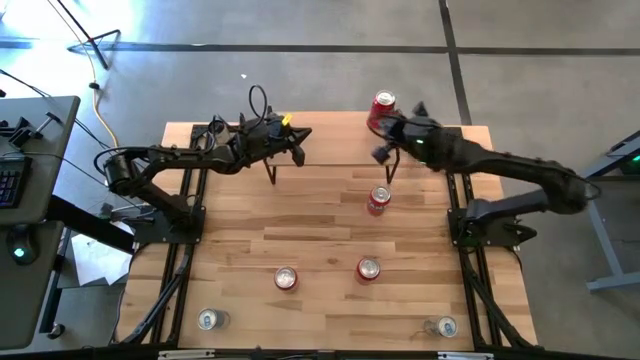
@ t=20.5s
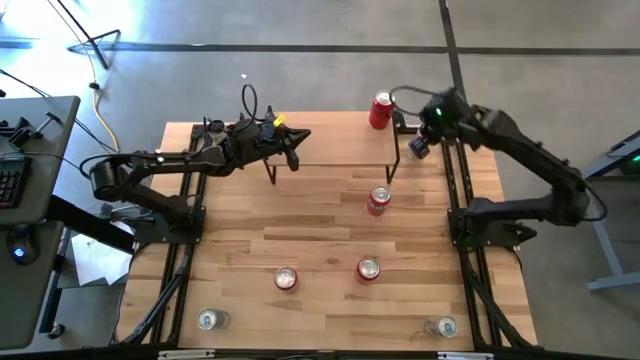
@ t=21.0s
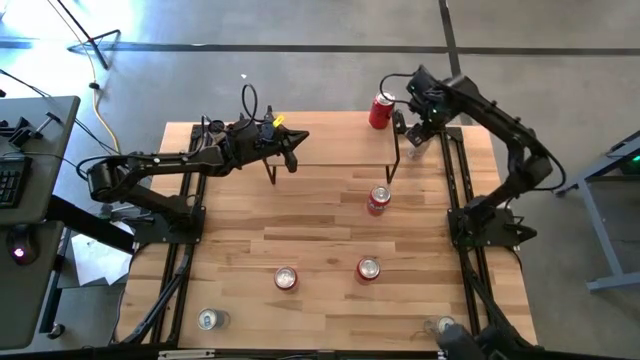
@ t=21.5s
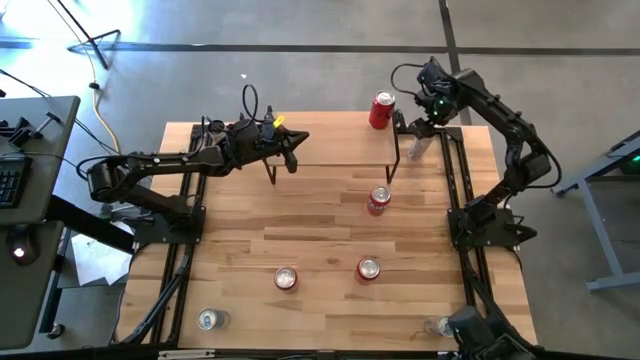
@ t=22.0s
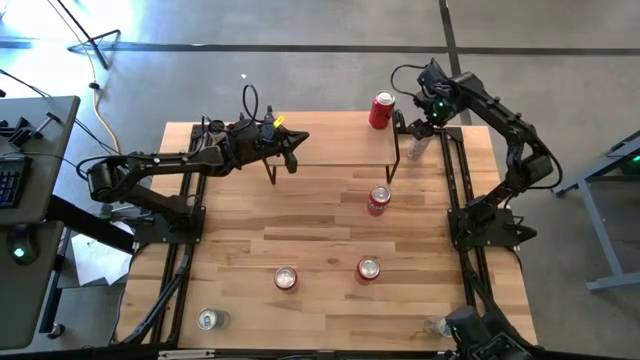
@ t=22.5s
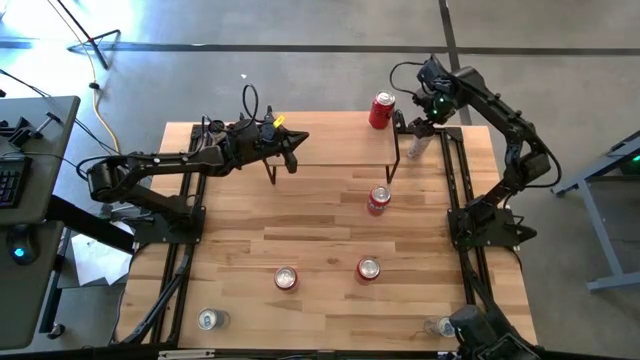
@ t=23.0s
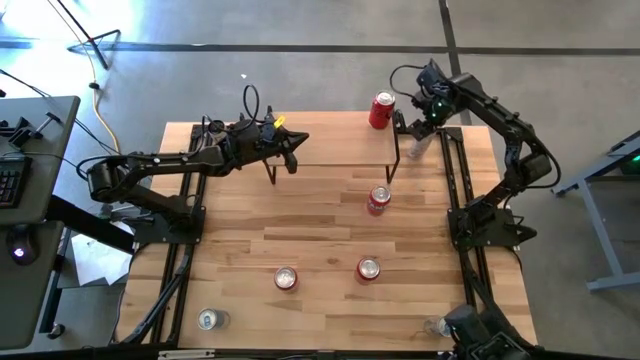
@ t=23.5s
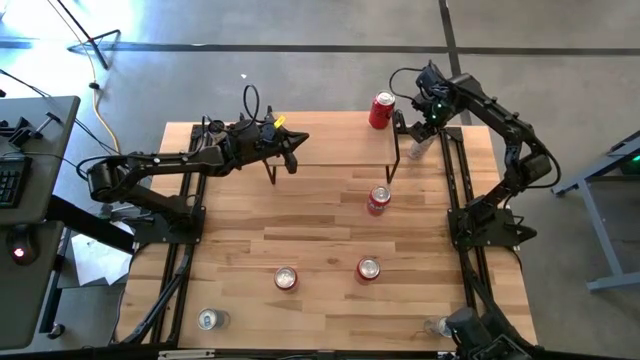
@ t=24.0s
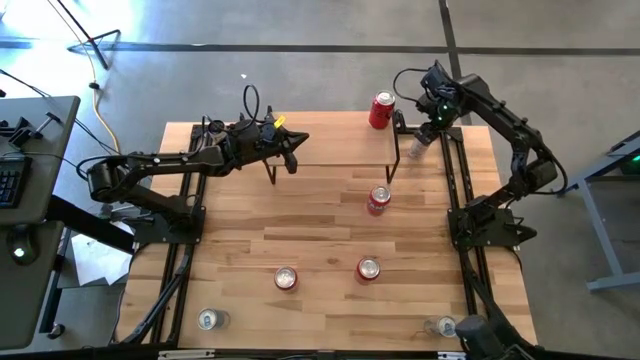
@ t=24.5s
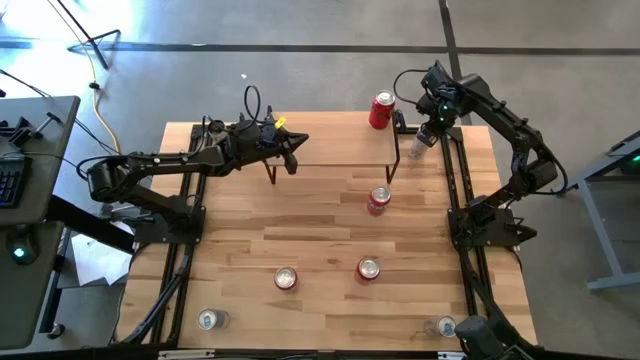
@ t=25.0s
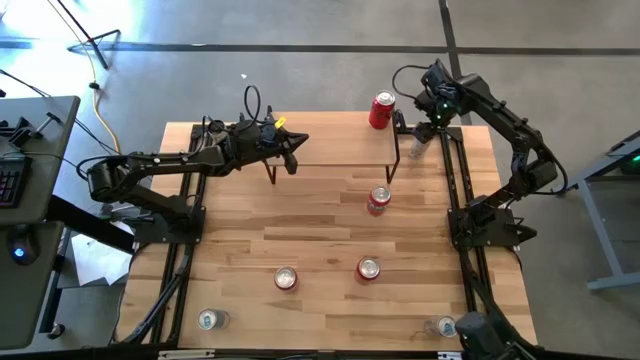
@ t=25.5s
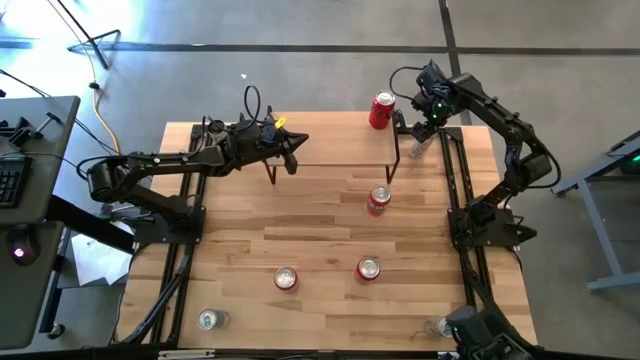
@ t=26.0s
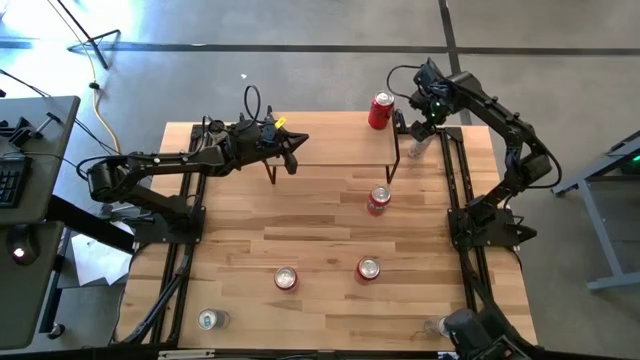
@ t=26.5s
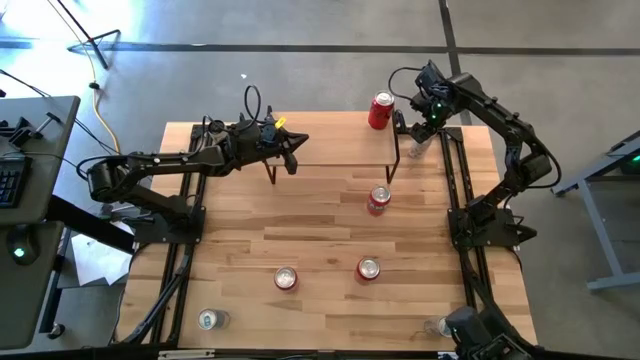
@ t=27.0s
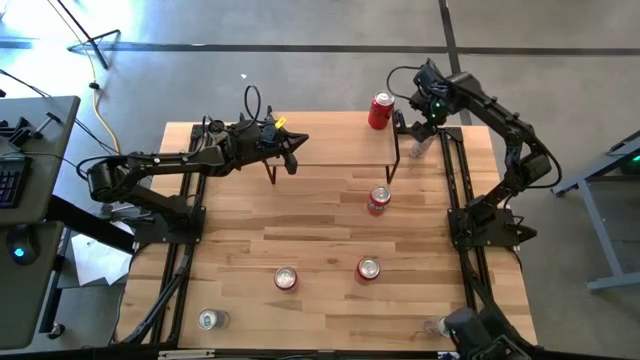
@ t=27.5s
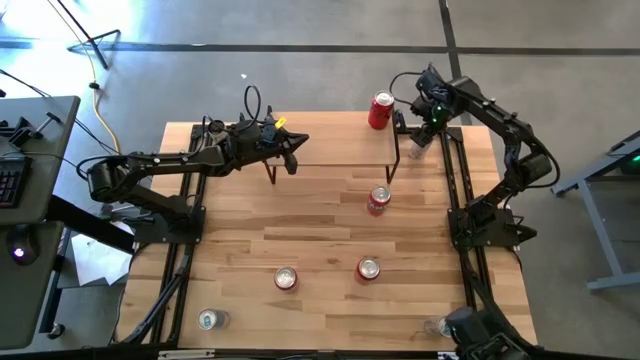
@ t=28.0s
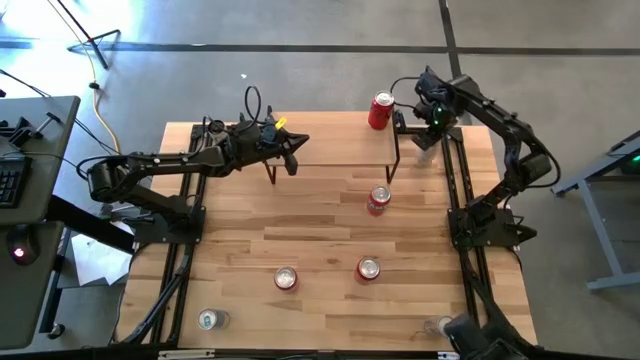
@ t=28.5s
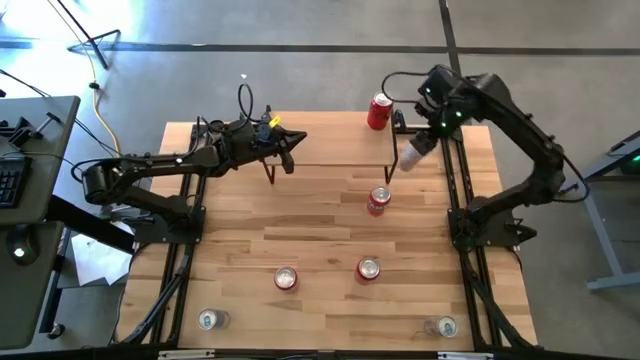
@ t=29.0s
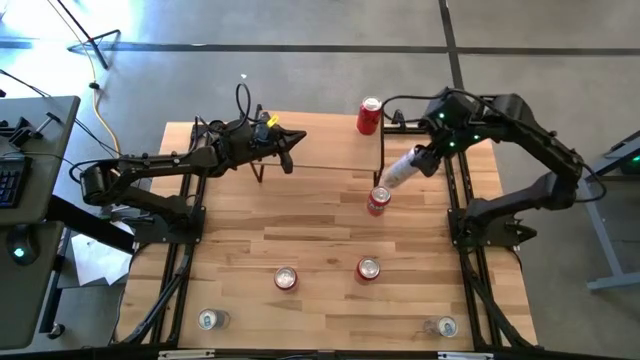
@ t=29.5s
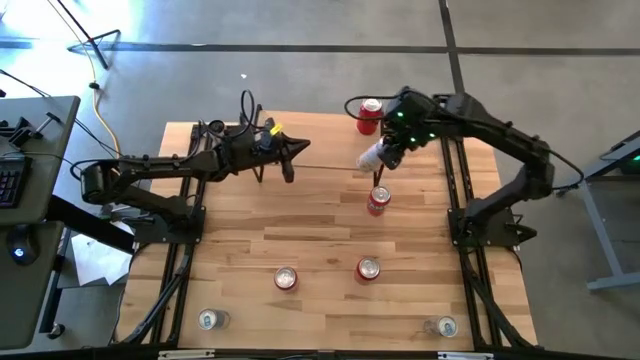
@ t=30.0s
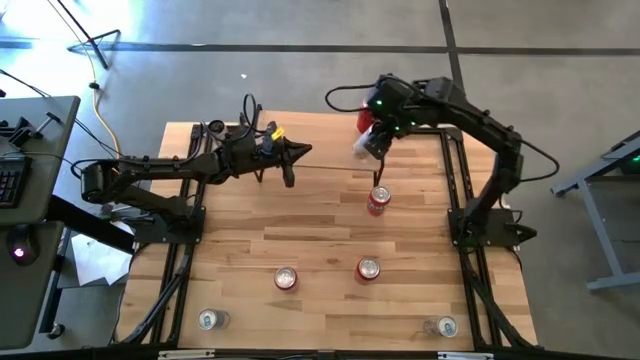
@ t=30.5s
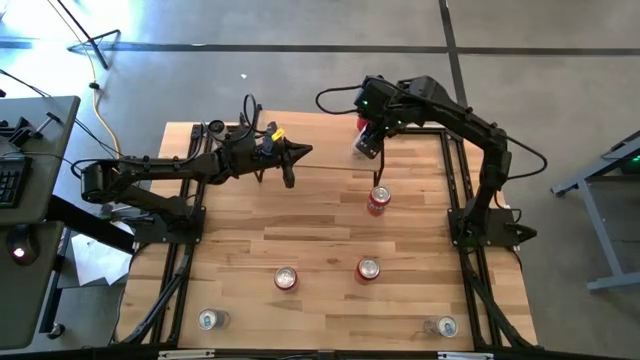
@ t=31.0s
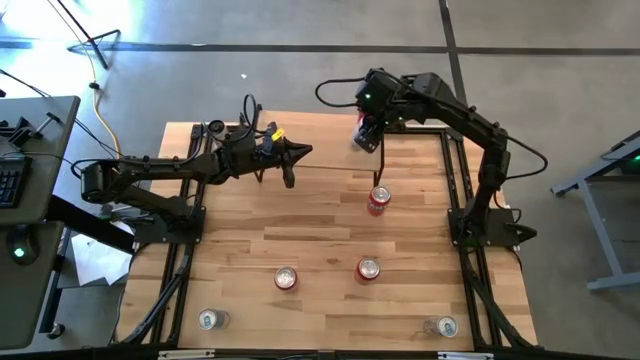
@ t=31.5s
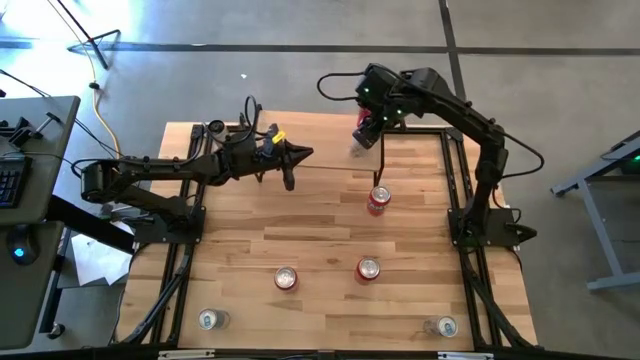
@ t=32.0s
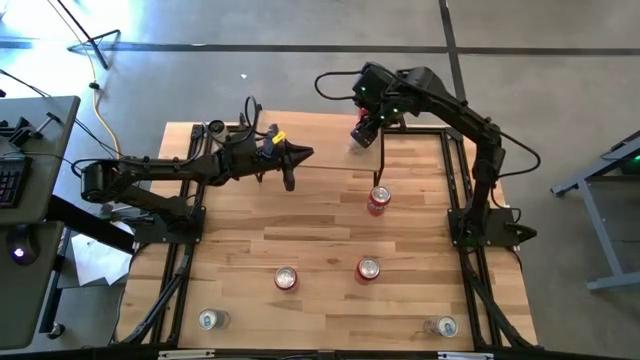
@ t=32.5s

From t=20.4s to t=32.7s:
Task: Place canned beverage on shelf
Put the right white and yellow soda can on the shelf

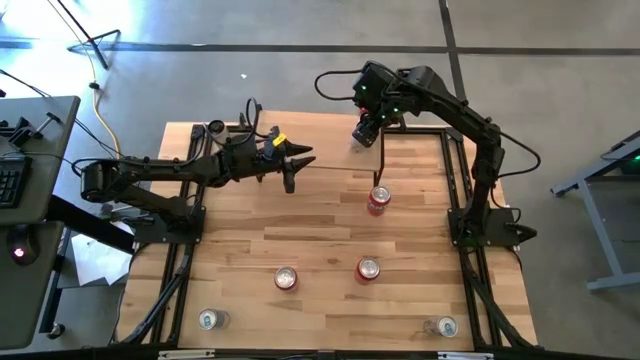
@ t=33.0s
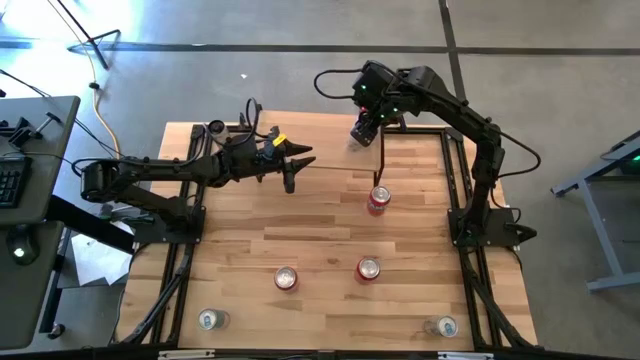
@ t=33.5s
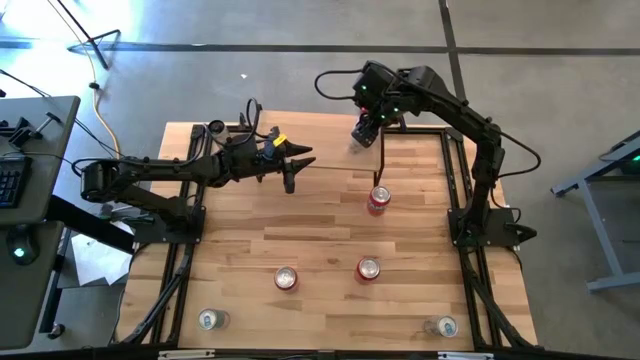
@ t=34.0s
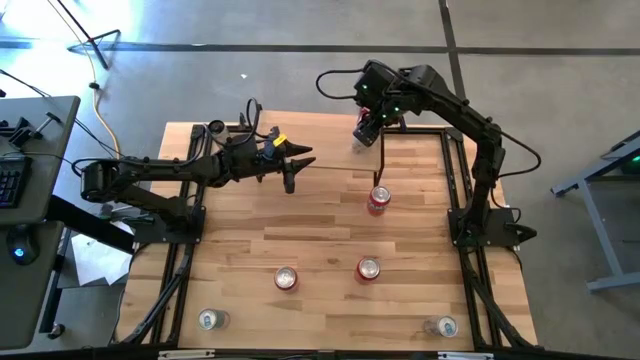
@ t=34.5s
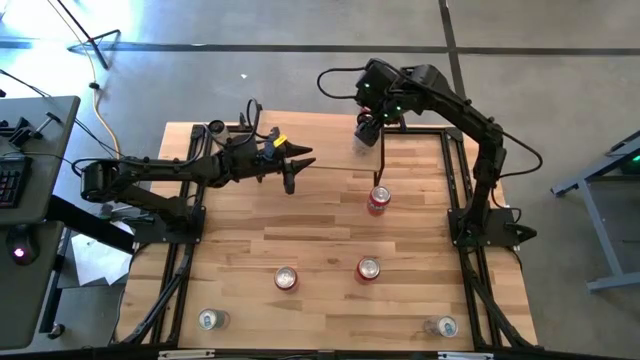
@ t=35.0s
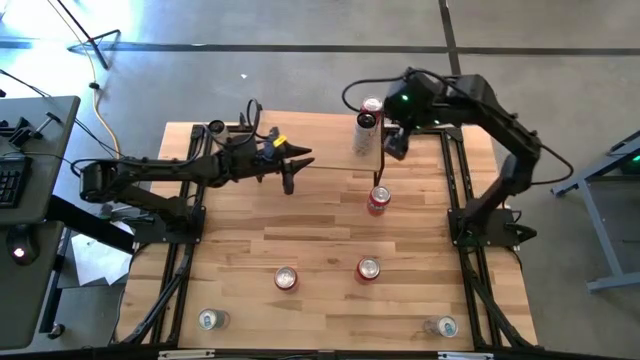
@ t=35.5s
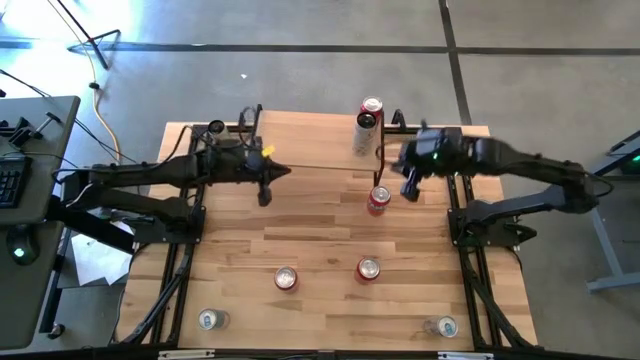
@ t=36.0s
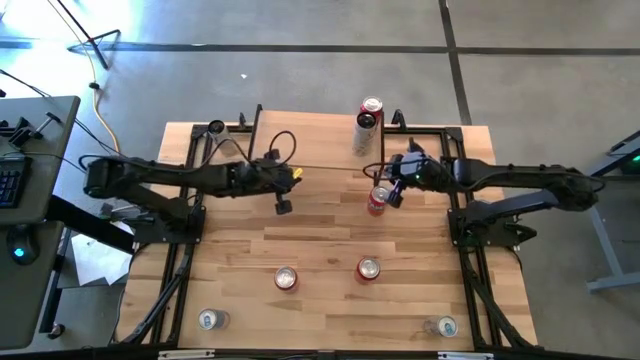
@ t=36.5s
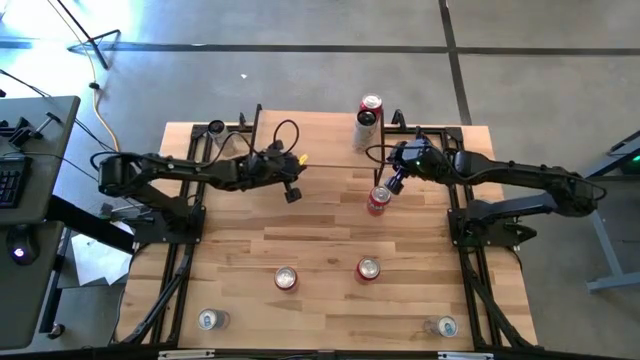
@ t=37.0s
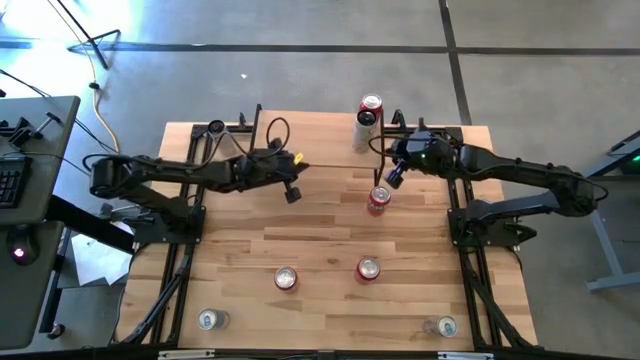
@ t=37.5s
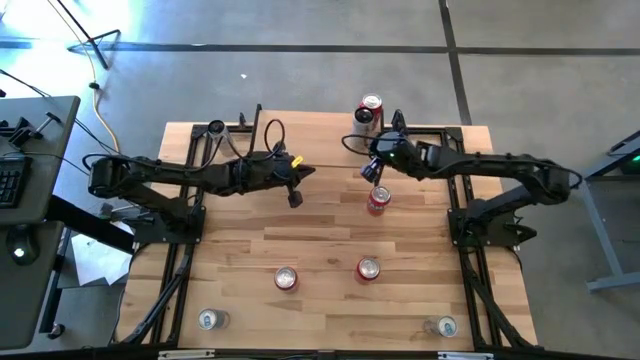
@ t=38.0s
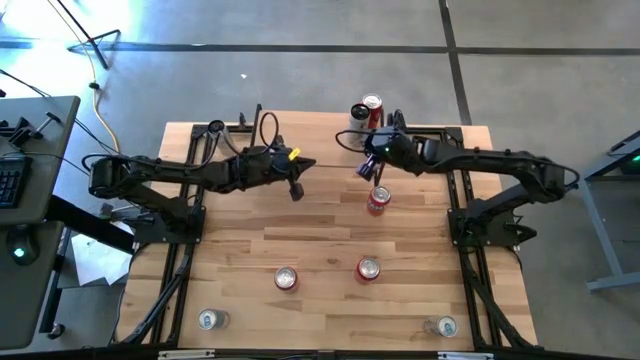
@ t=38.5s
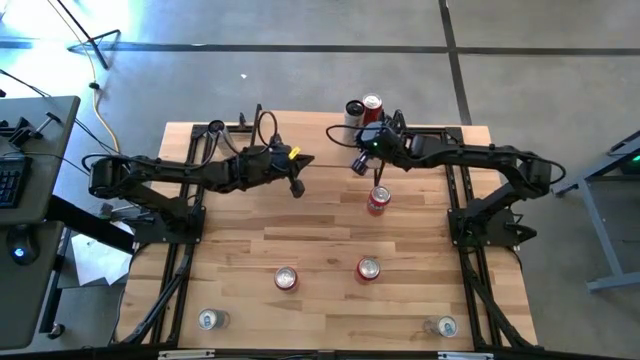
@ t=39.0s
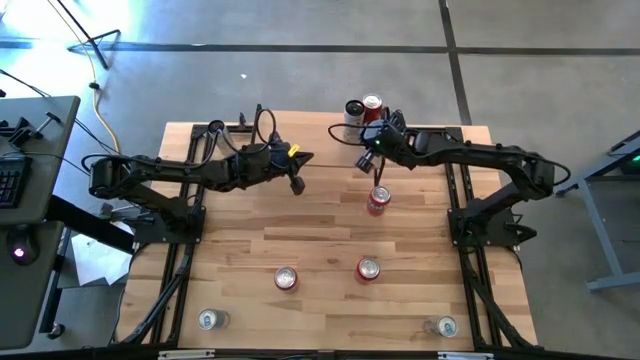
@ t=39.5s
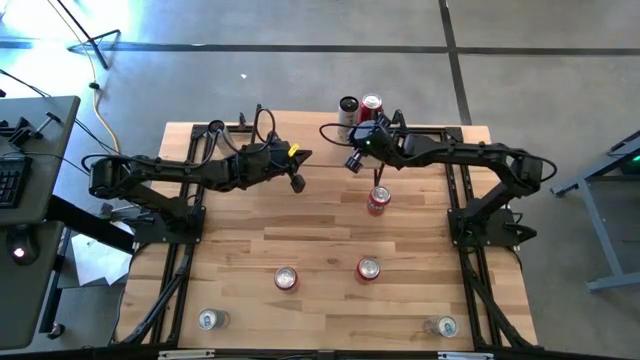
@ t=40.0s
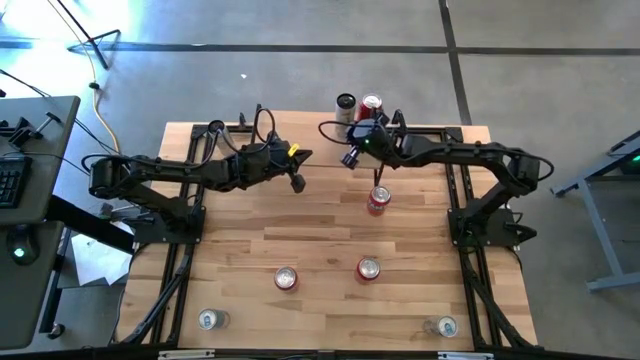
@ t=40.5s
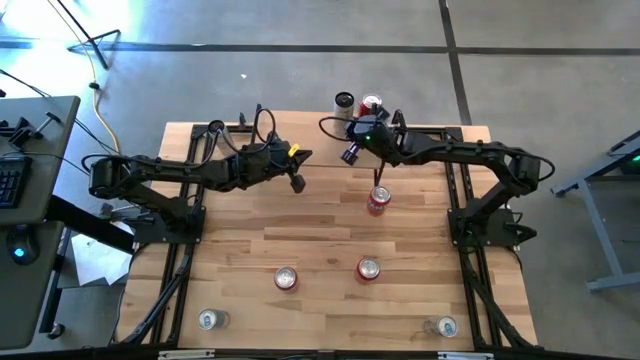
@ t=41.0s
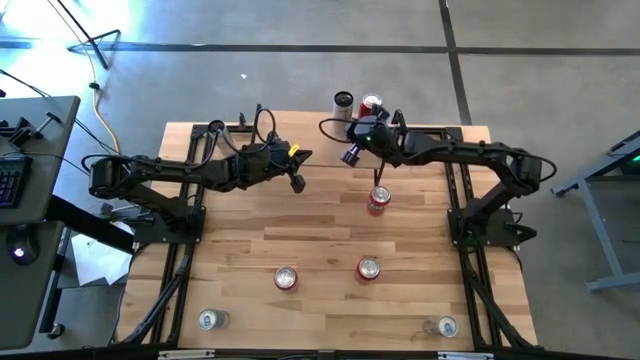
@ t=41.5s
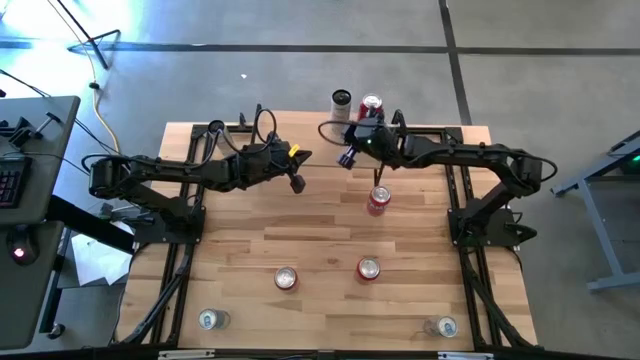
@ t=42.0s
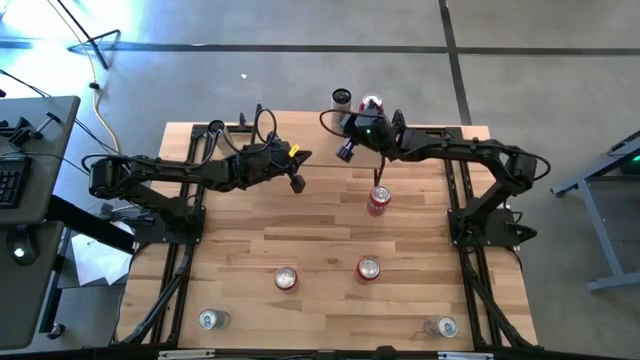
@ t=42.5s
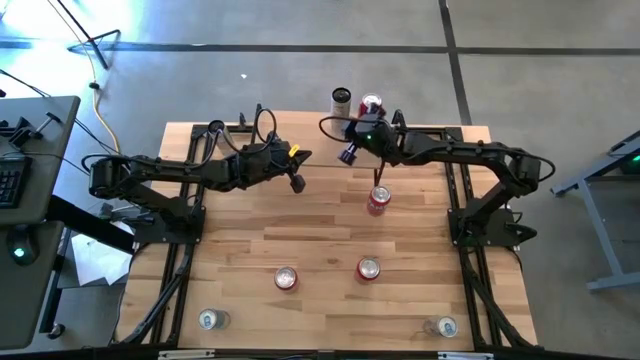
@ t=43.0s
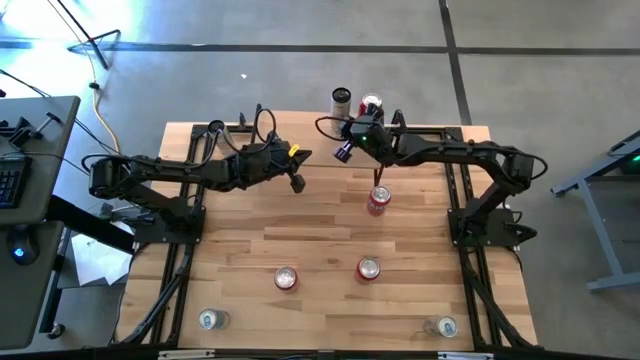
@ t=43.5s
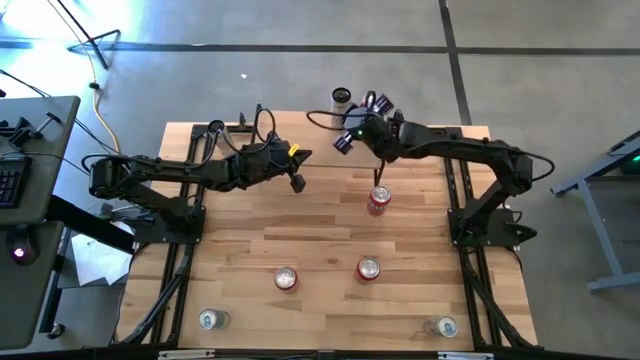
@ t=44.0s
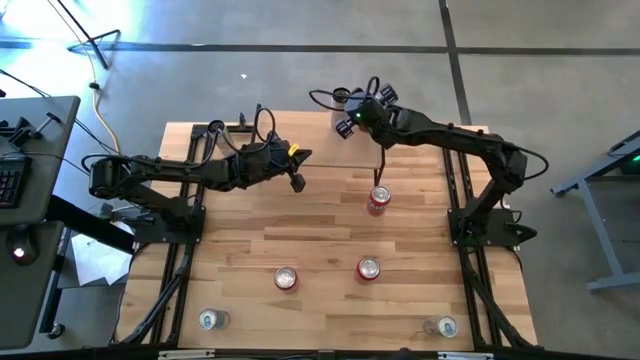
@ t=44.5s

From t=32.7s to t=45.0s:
Put the right white and yellow soda can on the shelf
